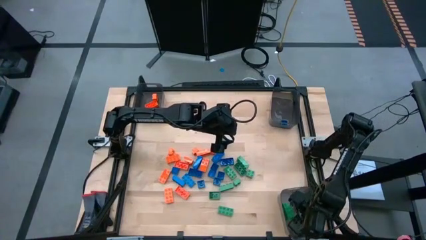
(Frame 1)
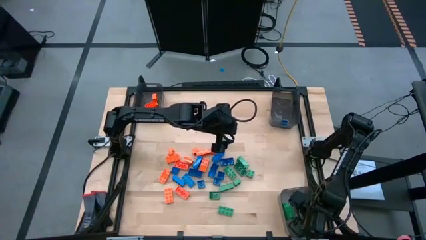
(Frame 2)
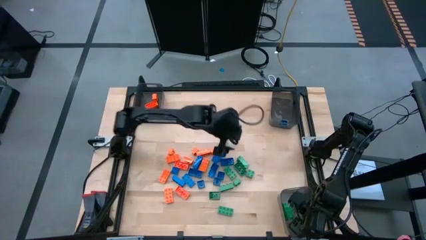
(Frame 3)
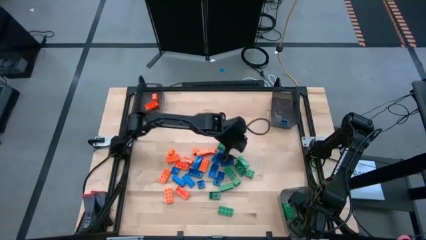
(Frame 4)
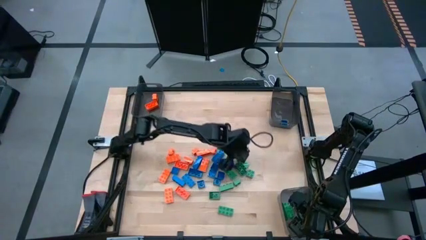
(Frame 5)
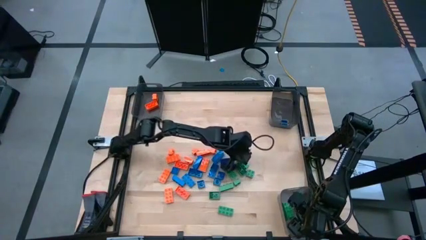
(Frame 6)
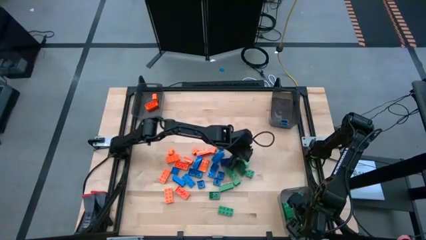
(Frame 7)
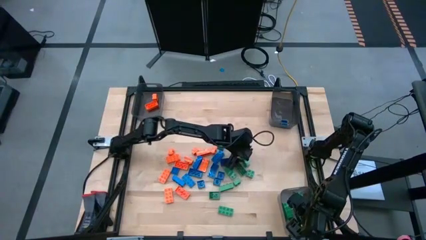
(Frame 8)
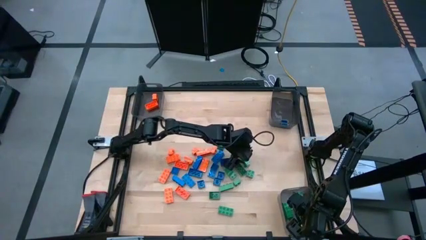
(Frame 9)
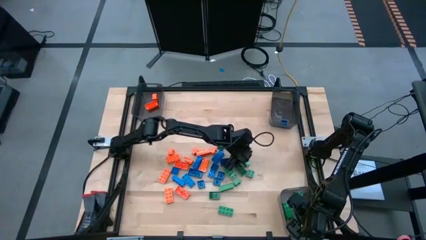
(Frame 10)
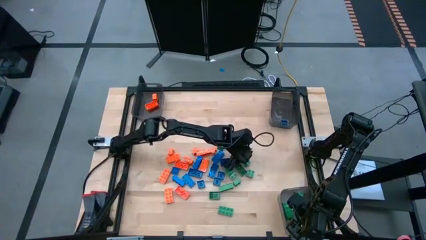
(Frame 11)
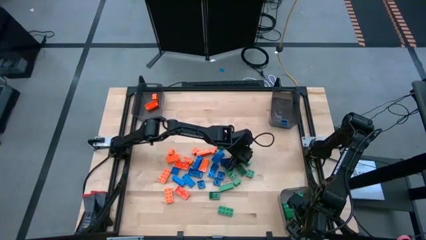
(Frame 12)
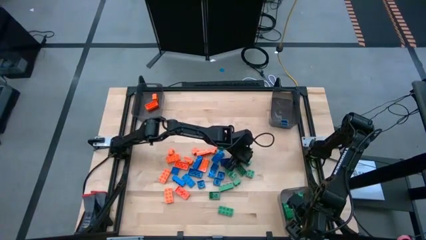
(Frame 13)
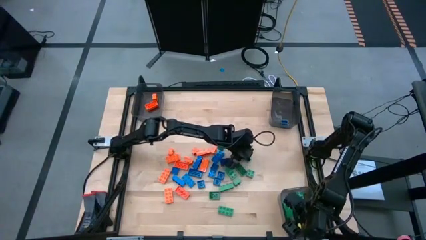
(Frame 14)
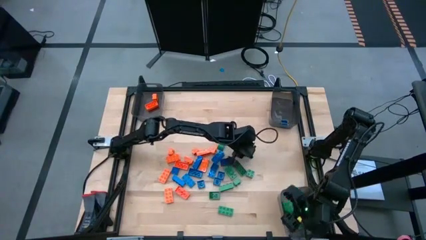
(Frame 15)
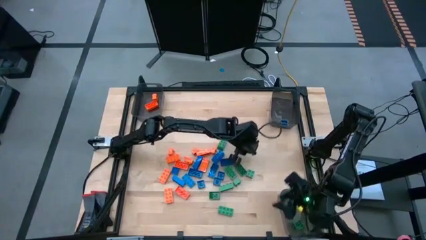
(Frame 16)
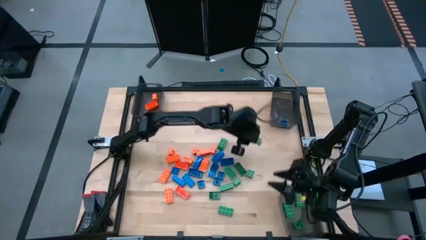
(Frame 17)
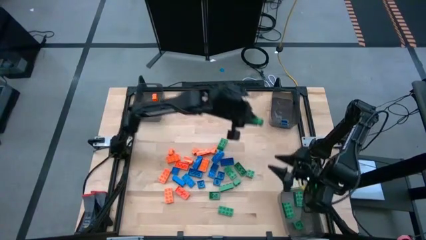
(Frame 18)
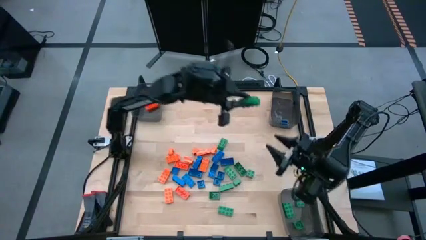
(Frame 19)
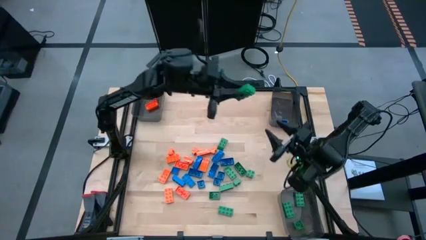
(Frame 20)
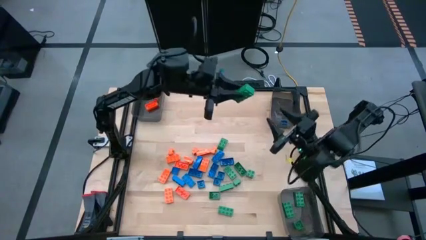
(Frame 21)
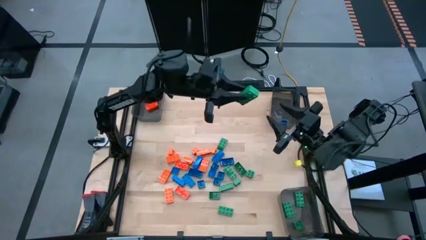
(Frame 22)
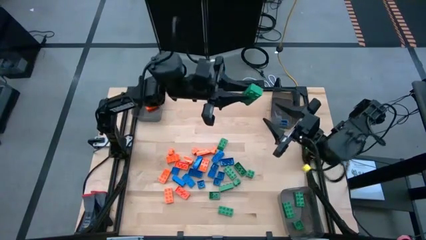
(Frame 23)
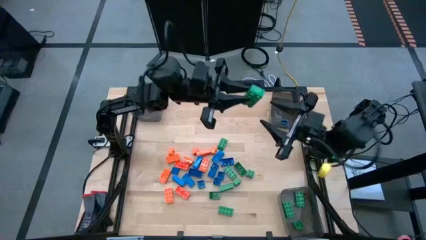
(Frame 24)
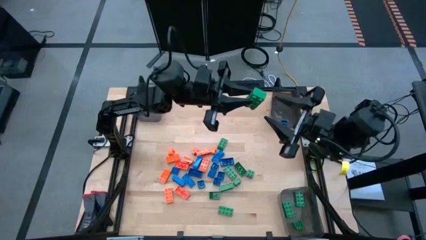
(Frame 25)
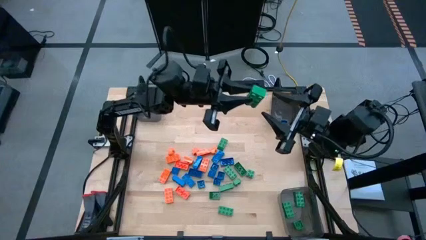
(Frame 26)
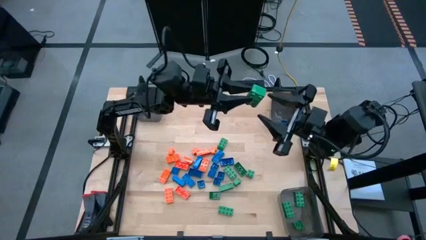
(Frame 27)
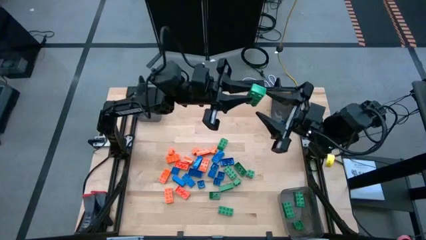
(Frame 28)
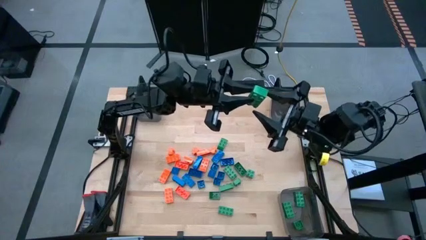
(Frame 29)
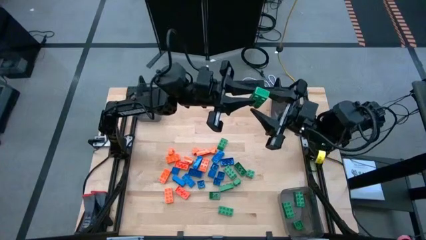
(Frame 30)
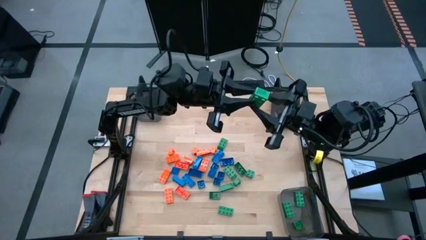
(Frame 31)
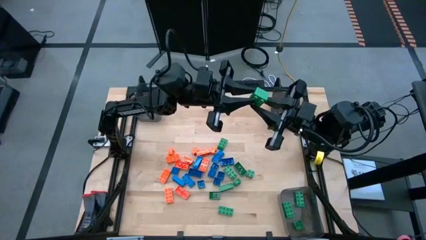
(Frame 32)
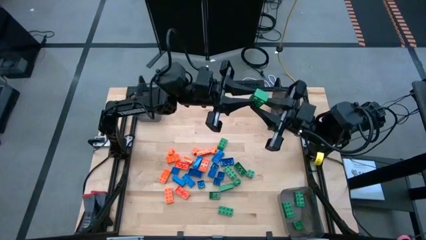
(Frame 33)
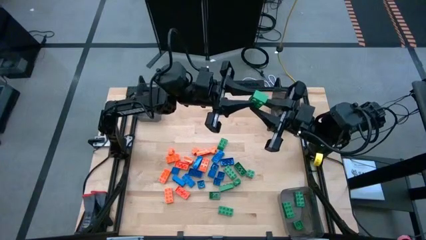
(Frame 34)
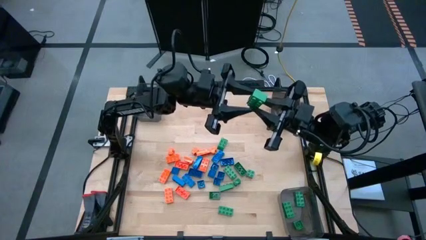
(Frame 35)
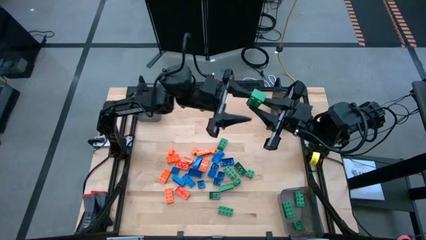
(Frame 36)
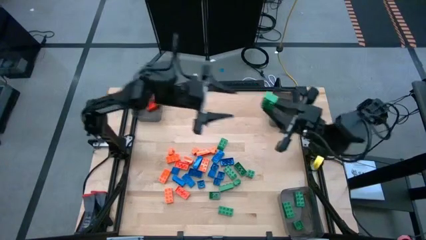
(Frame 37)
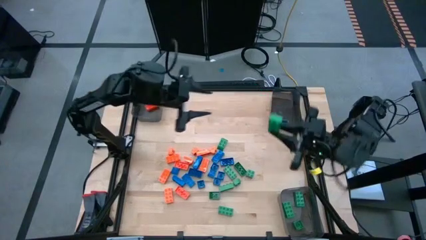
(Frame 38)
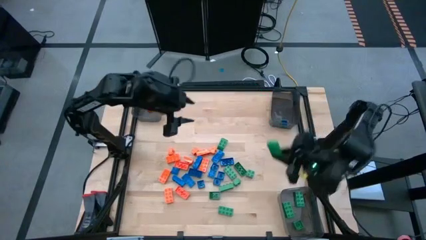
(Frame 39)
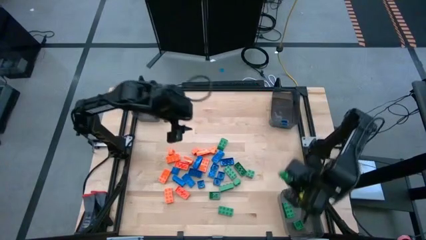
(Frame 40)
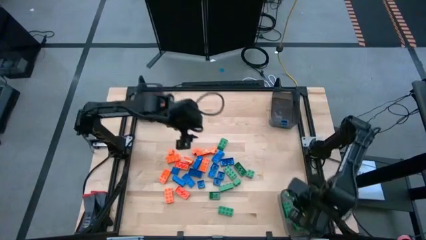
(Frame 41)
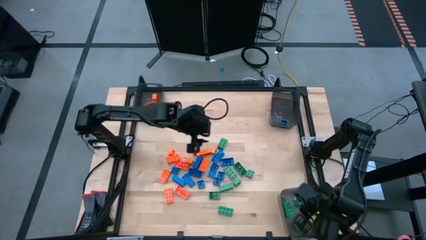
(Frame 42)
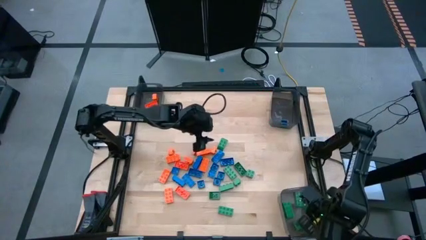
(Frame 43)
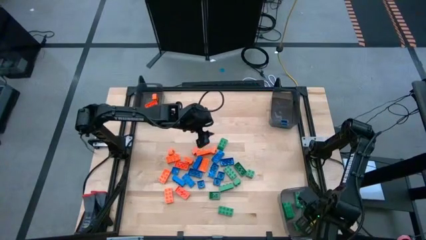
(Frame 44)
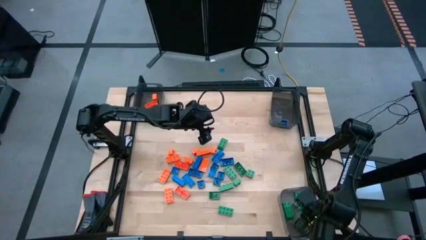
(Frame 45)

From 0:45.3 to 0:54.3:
Task: Sort blocks
Put the green game piece into the bottom right black bin

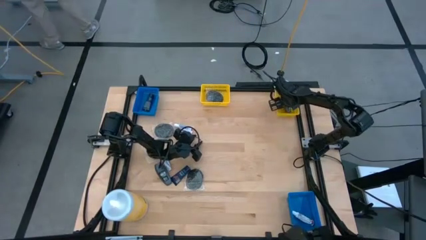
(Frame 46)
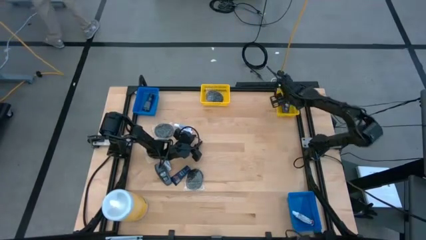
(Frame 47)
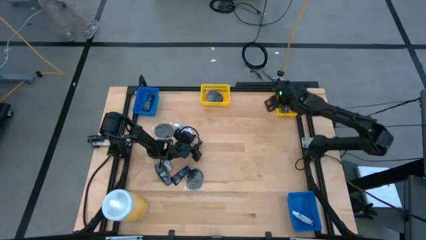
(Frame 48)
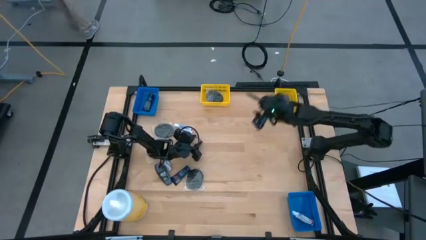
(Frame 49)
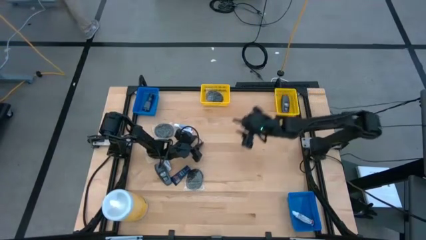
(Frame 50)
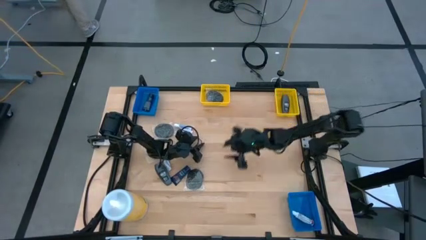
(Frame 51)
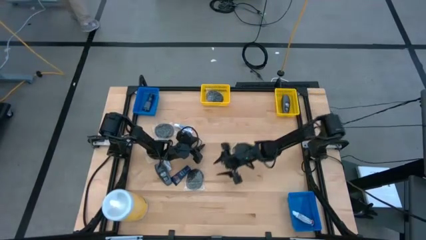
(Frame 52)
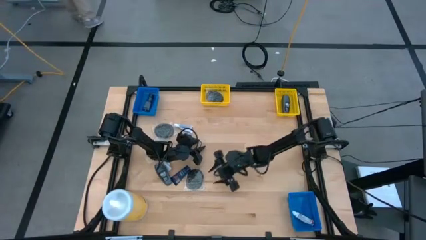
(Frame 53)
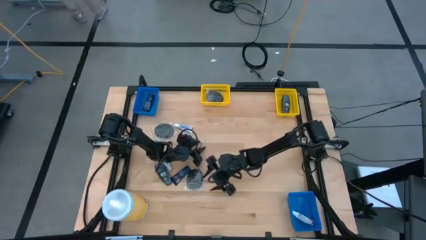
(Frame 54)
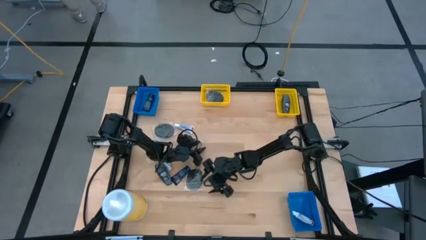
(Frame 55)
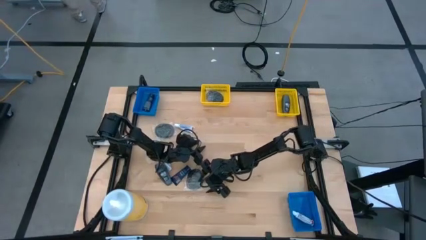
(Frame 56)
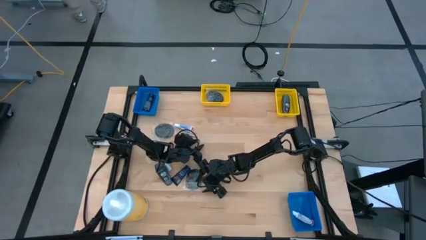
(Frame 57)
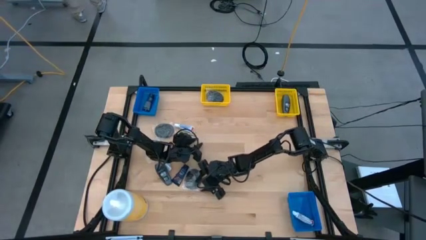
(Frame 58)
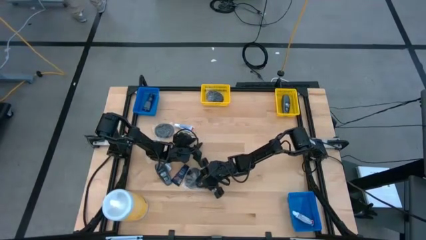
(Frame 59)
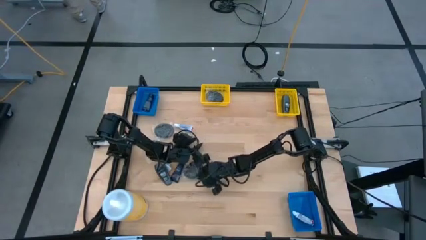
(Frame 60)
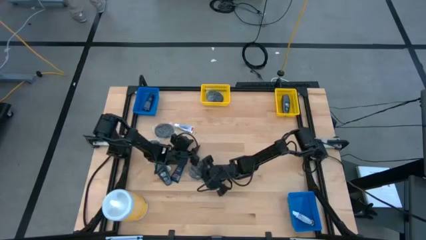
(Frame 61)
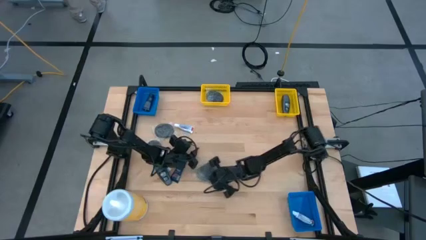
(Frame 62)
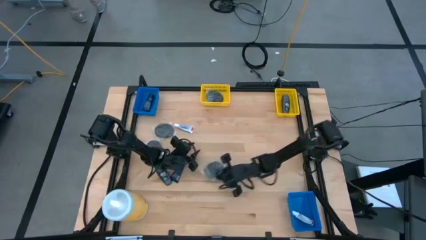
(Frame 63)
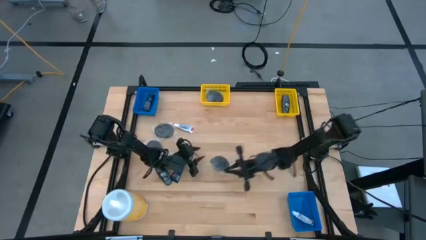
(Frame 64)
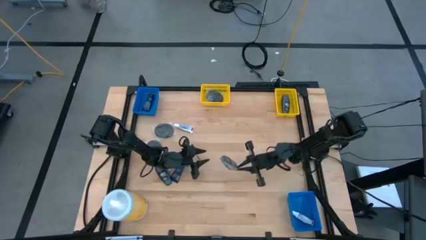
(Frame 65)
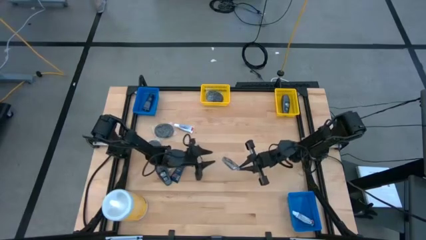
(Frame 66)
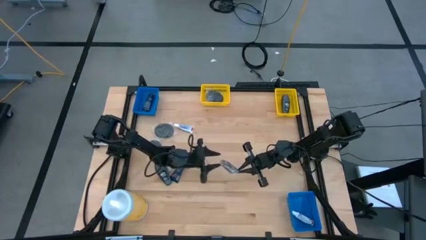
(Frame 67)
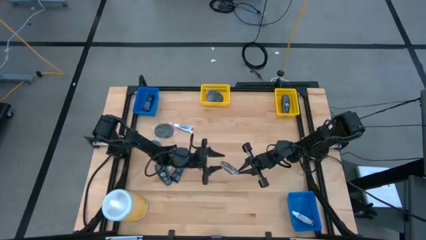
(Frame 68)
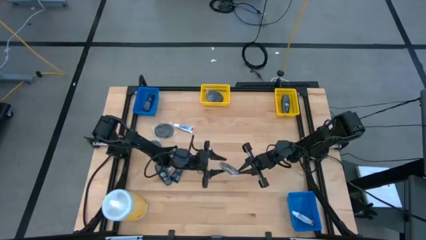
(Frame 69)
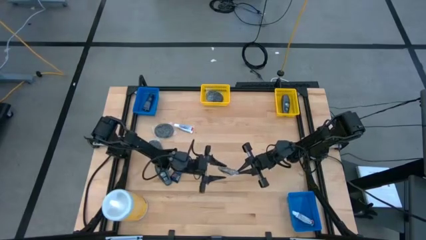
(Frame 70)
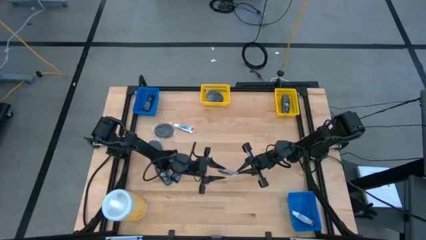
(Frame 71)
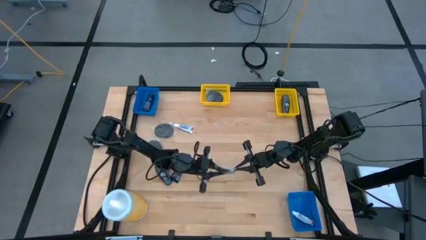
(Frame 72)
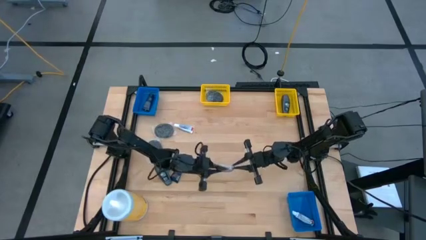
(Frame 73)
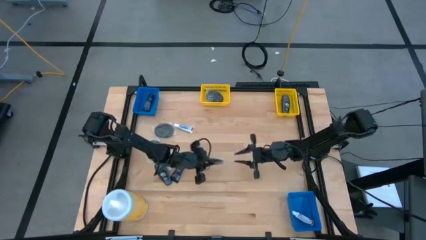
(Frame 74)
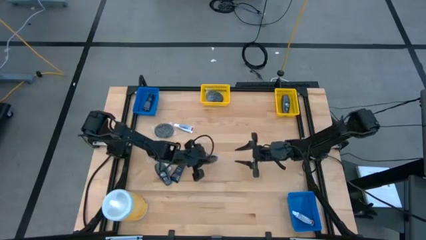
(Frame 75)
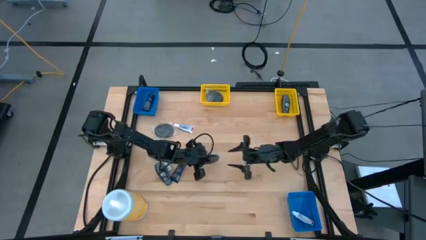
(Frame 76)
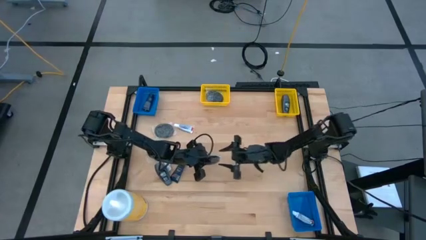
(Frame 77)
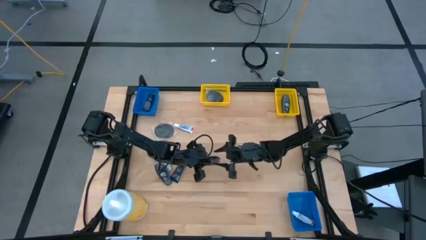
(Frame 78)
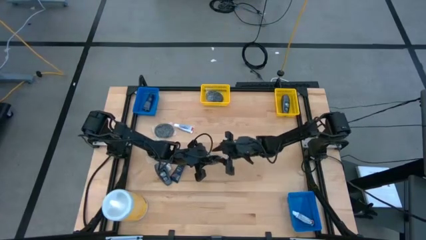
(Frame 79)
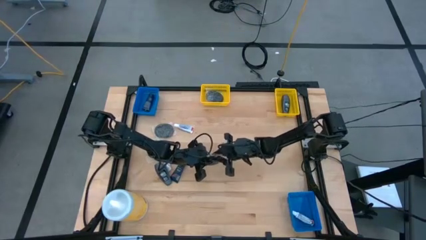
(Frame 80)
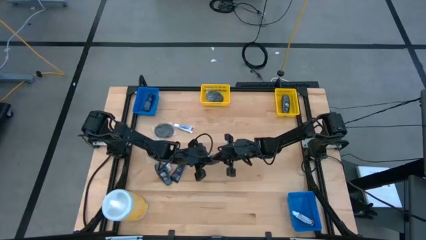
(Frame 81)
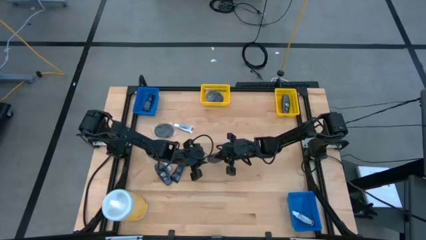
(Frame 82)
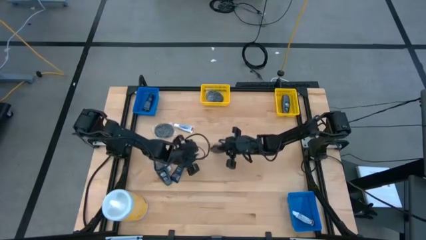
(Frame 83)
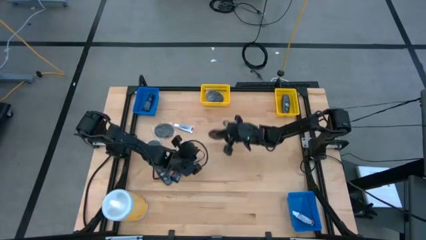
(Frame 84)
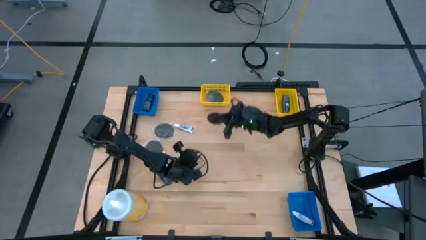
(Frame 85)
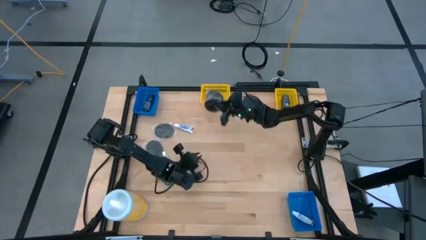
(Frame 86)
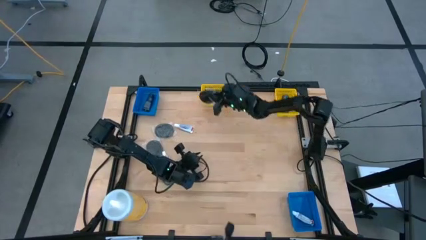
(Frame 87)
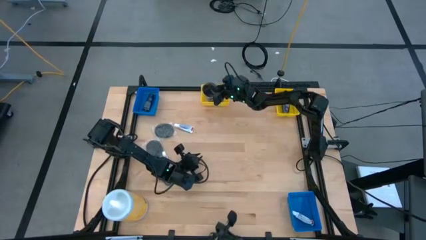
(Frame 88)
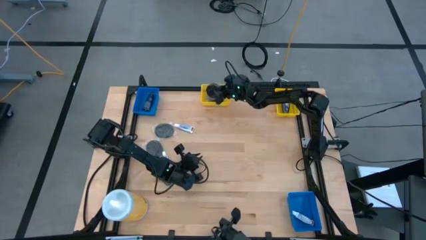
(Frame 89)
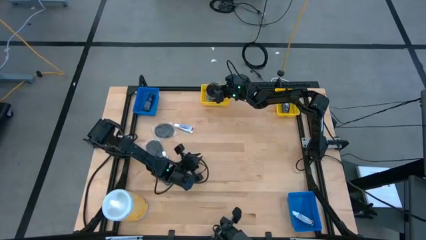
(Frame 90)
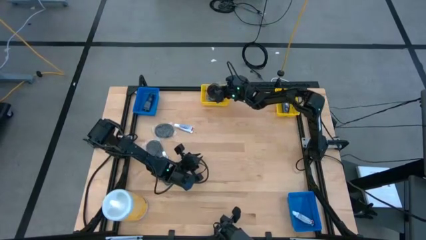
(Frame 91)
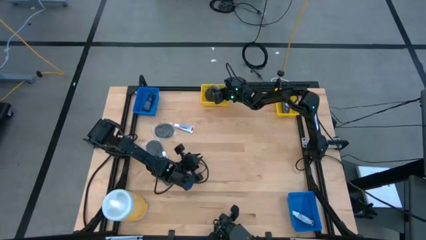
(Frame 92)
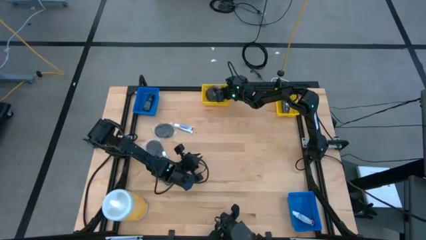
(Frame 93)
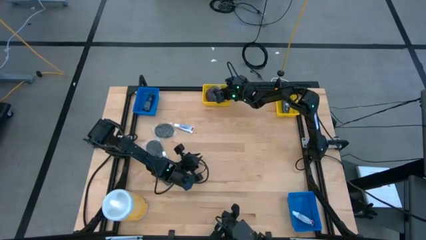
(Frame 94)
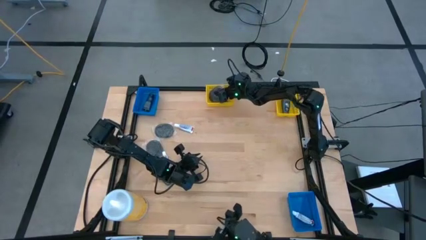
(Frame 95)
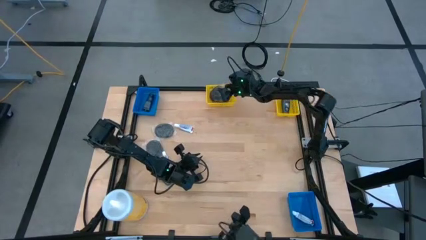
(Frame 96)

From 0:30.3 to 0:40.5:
Task: Pick & Place Travel size toiletries
Put the hairbrush into the left yellow bin
